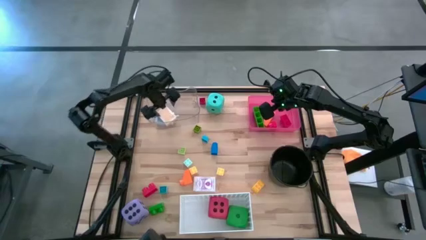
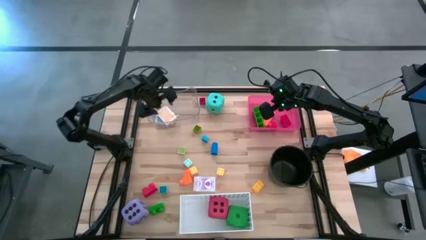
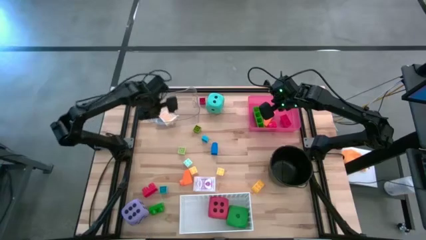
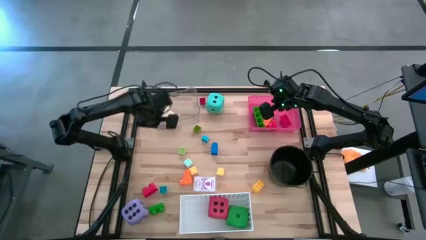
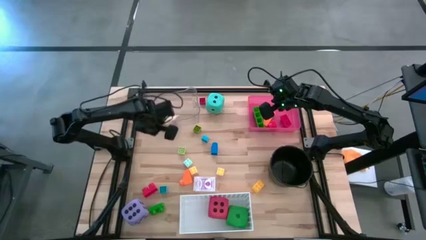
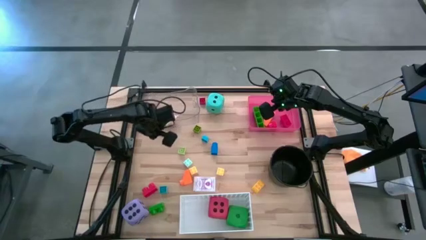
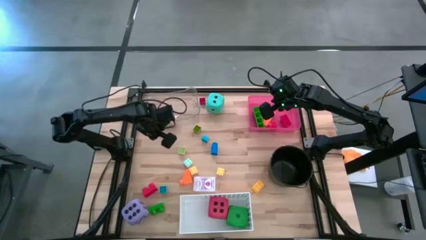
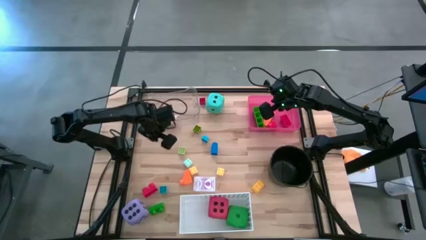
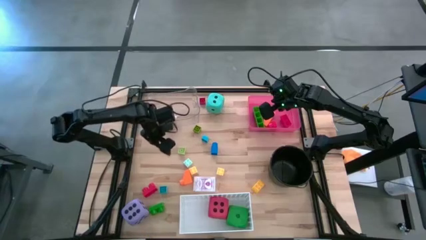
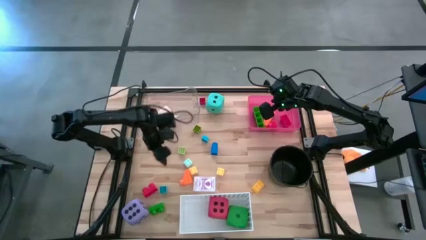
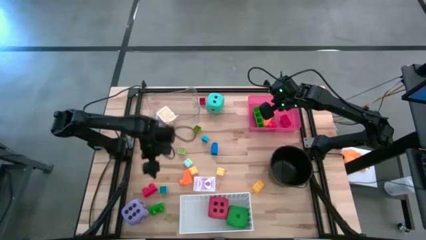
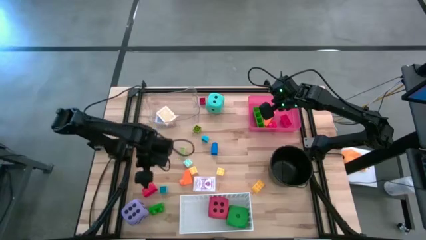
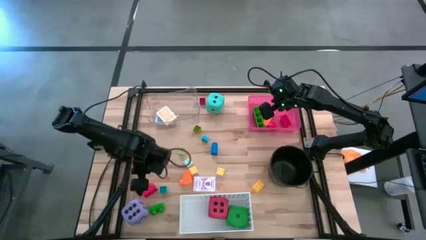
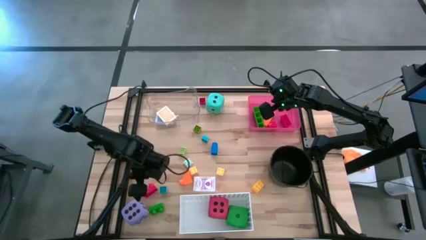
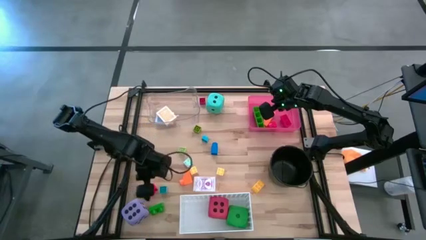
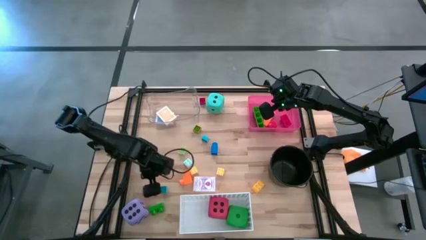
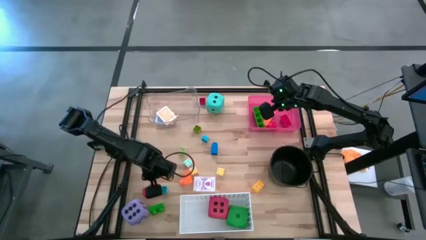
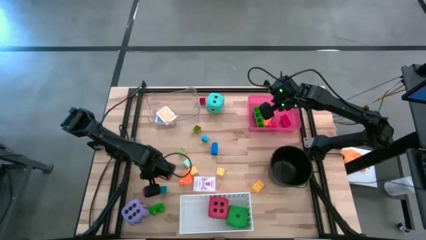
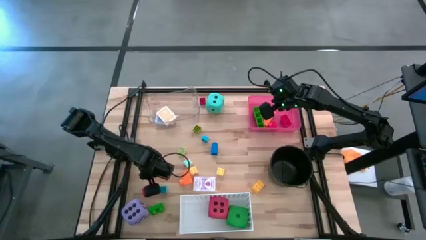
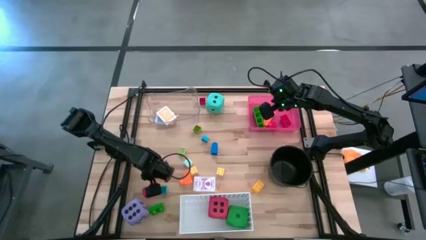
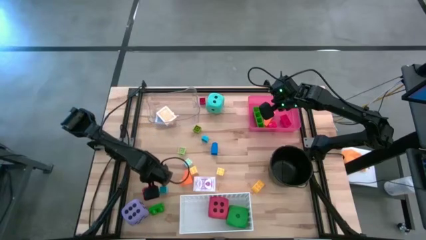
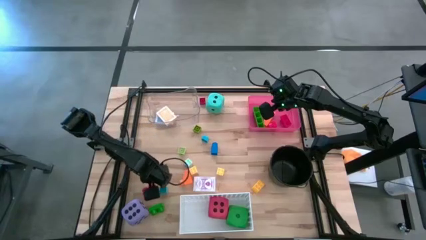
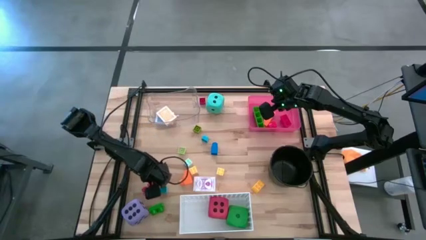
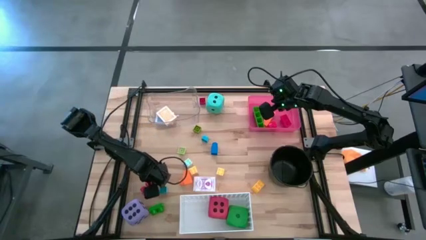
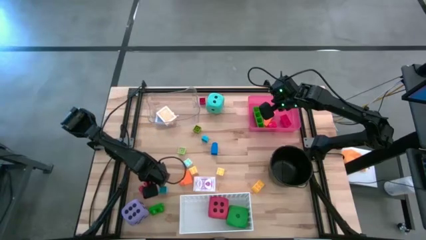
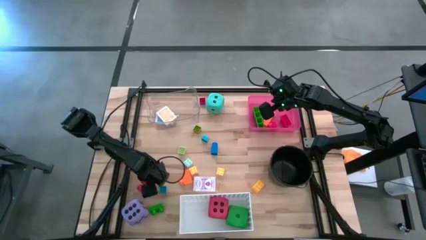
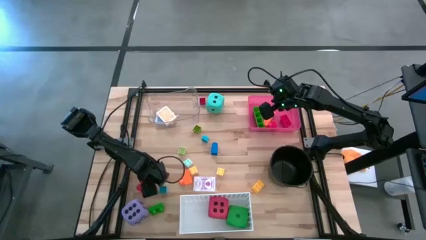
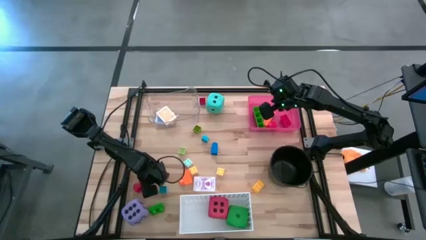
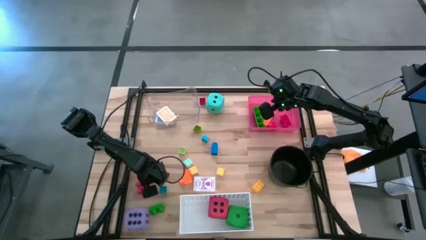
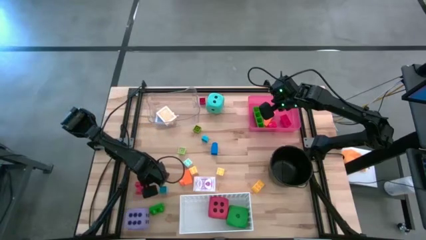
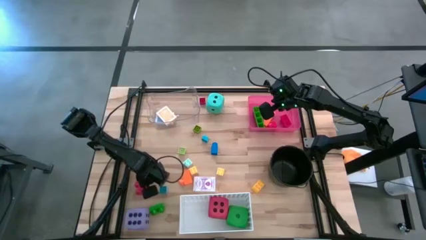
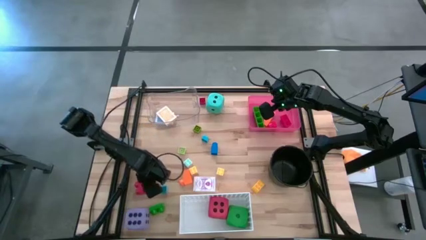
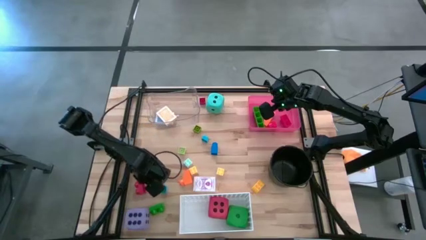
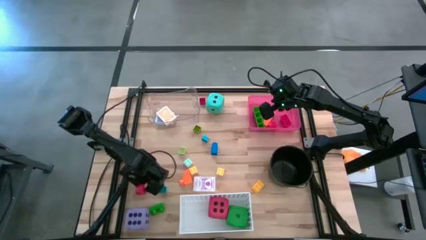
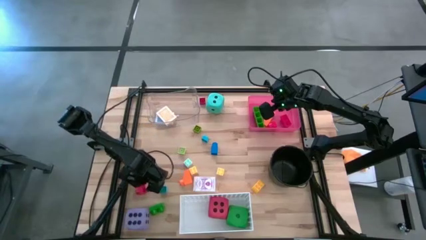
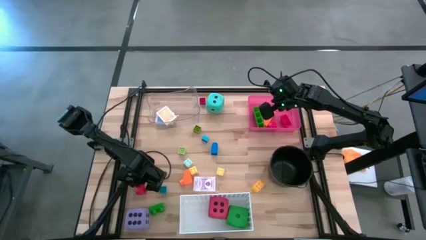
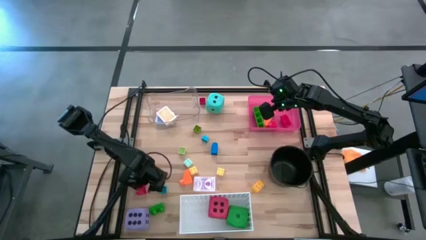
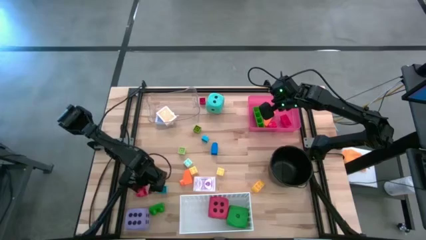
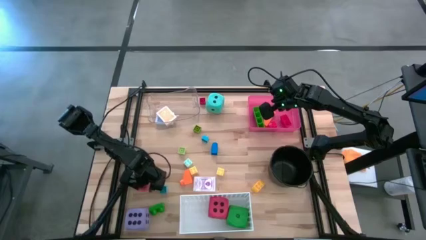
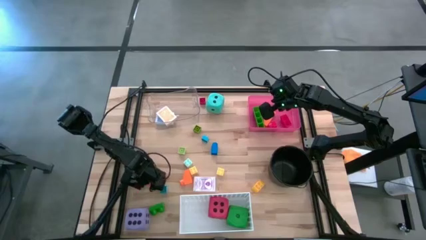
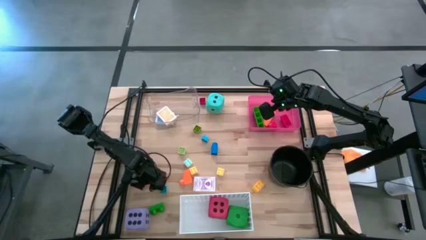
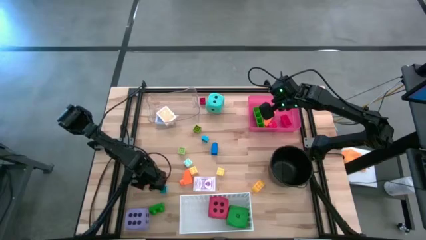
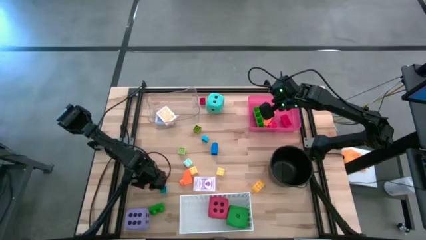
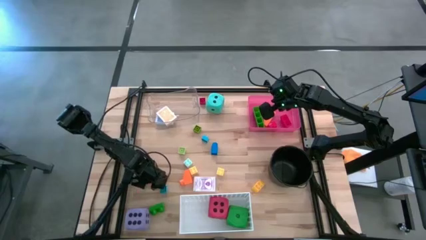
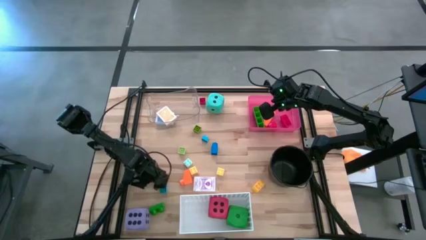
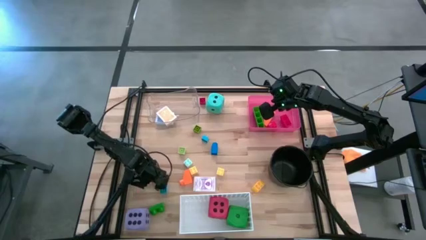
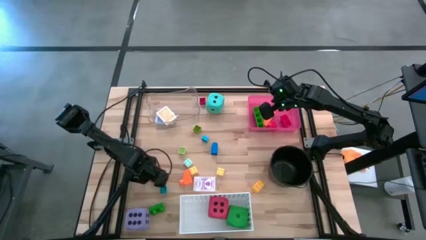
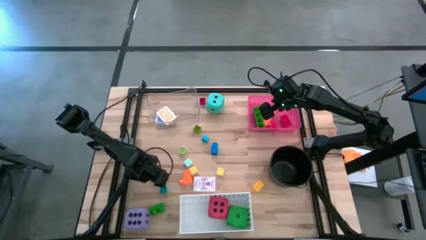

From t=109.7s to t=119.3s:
Task: Pick & Place Toys
Put the red game piece into the red bin

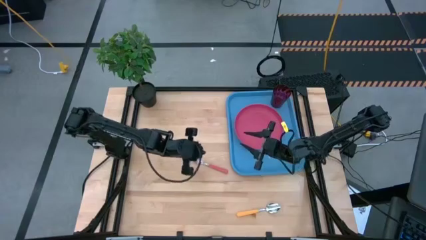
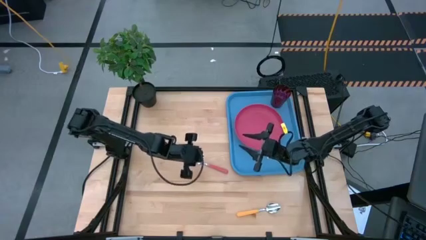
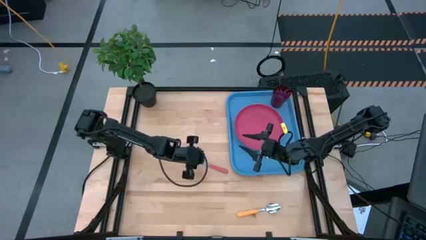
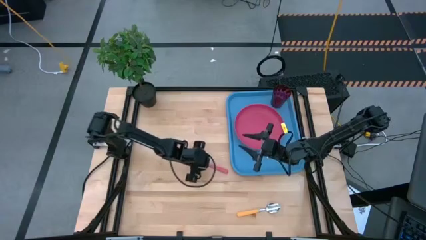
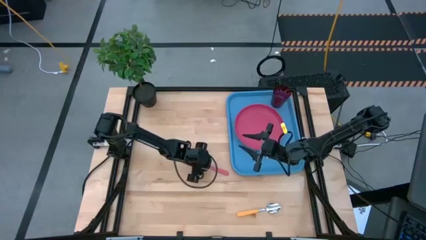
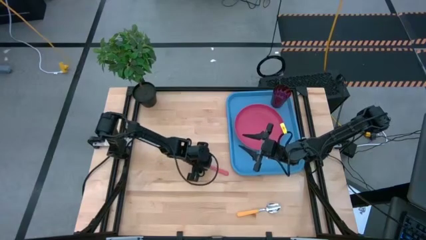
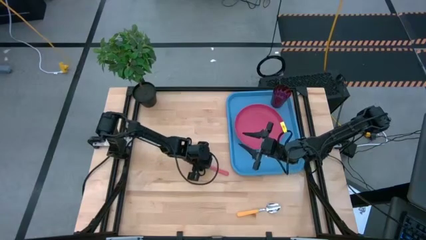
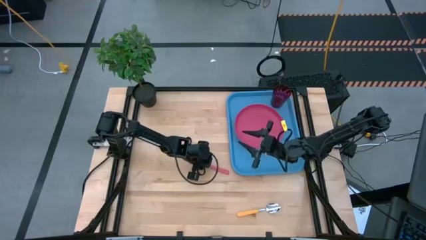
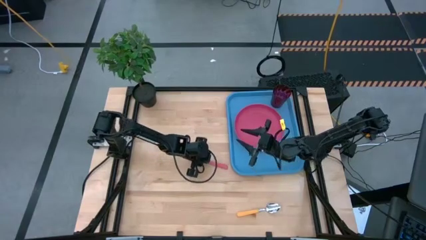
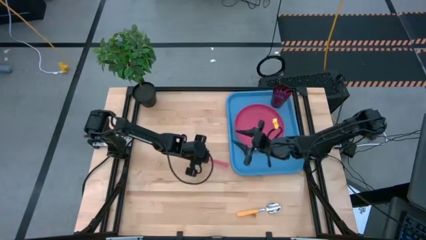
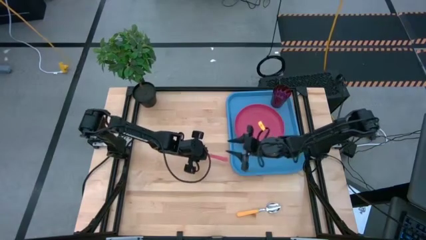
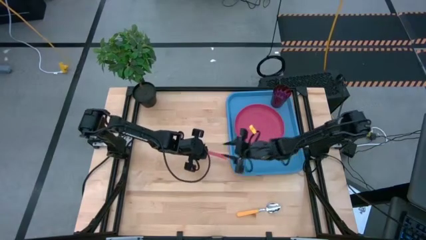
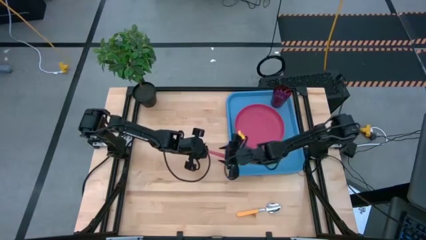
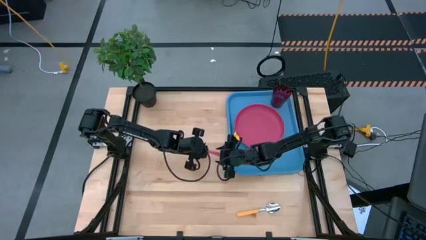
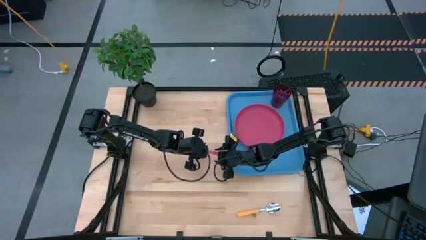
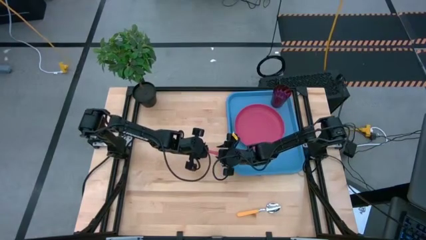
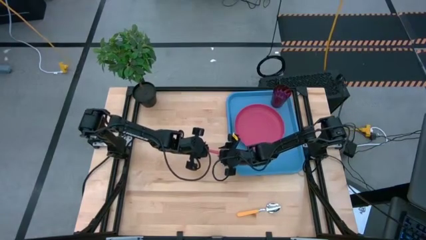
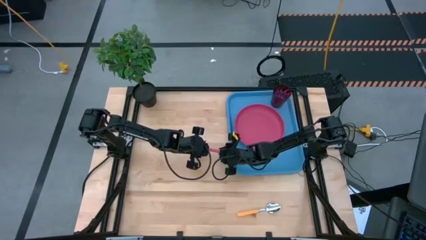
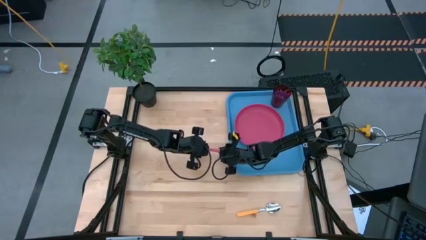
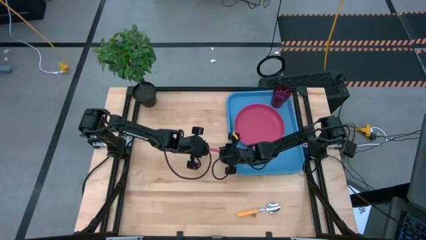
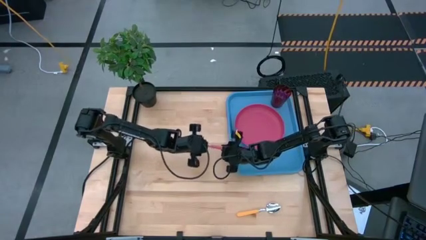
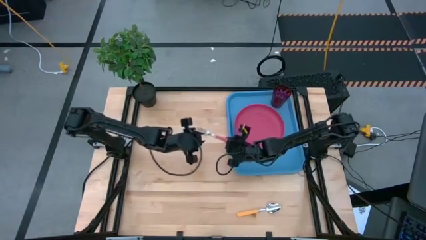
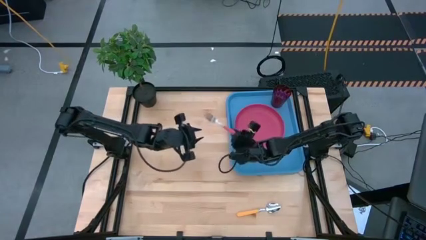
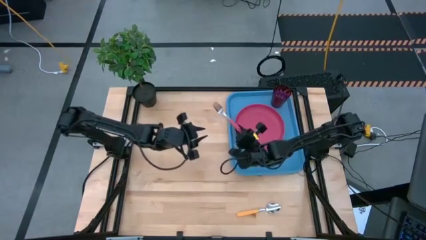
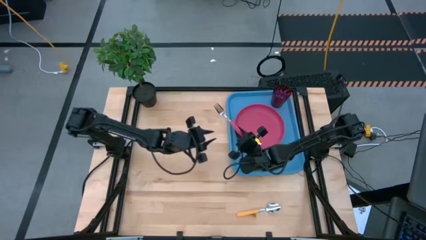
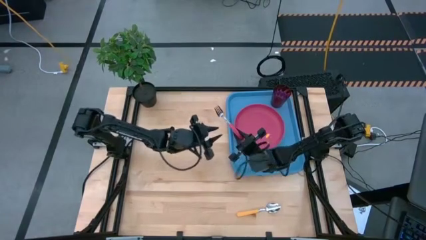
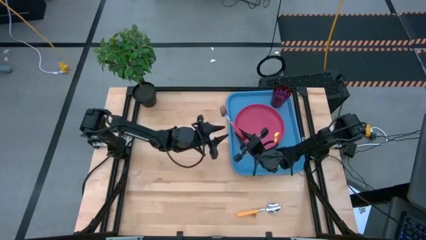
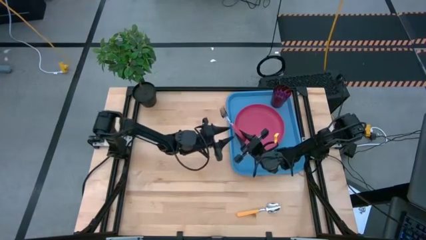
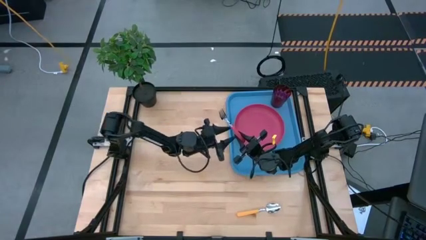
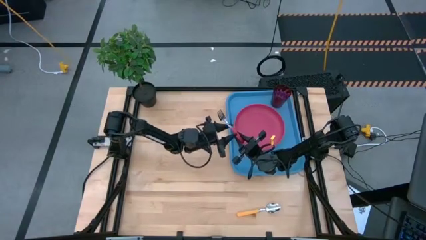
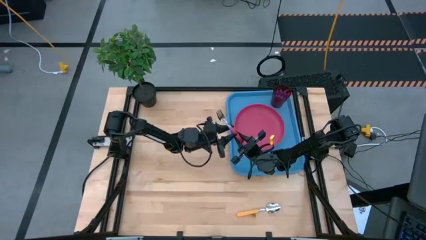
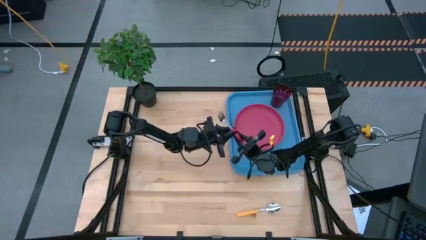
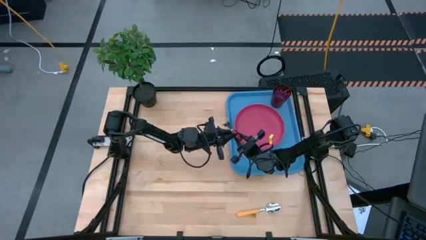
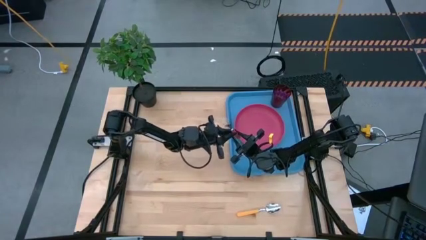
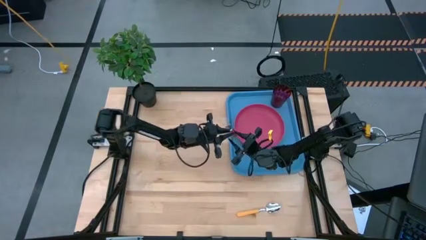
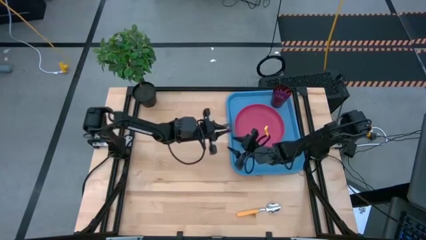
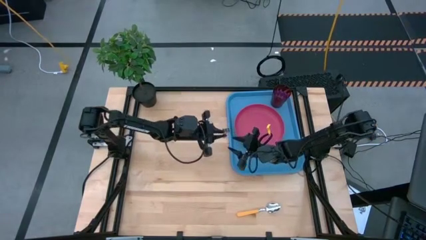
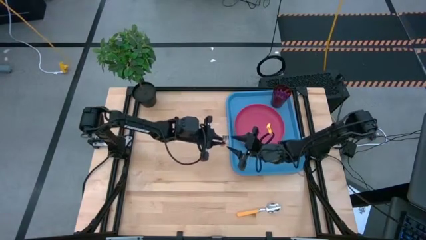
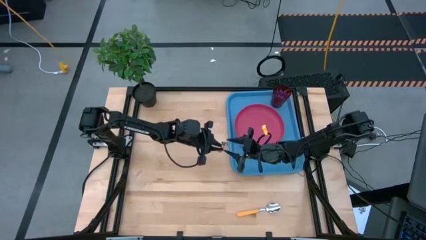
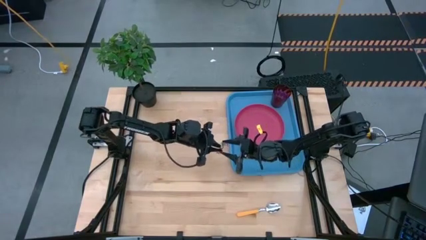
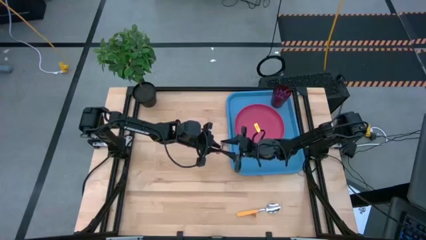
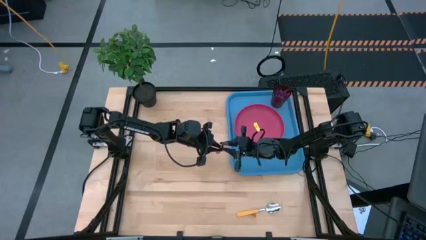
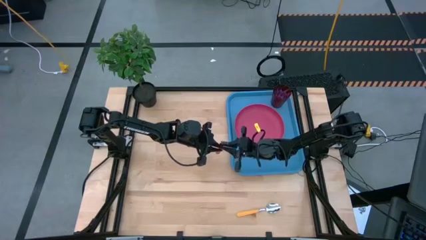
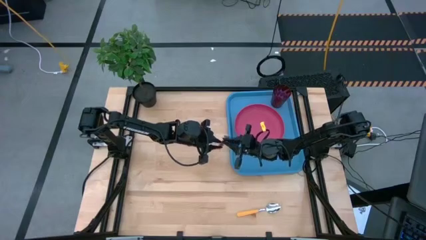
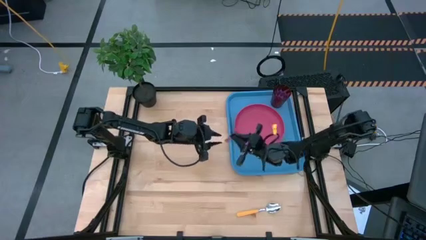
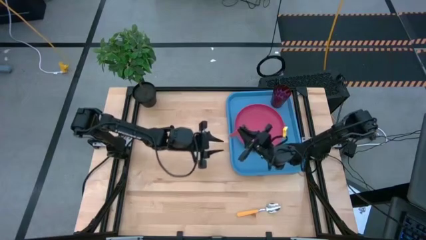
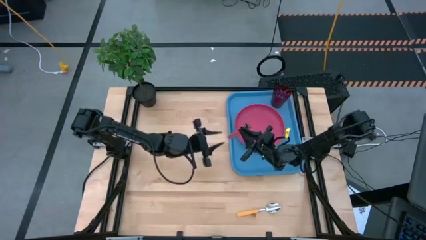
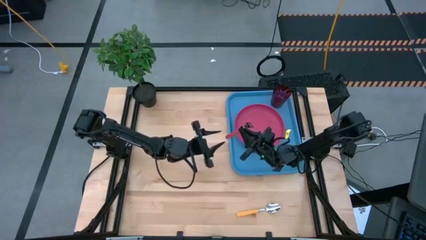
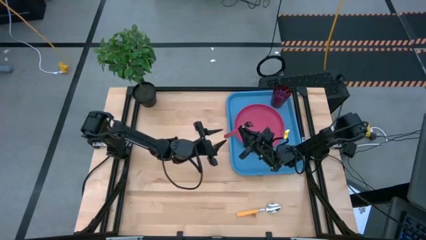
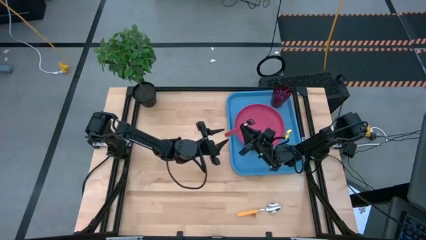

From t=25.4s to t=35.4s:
Task: Pick and place plate/cup/fork/spoon on tray
Put the pink fork on the blue tray
